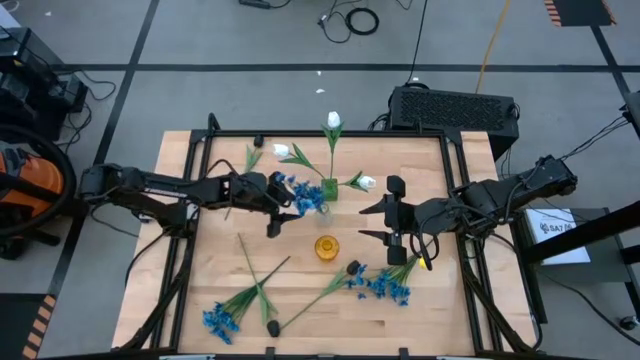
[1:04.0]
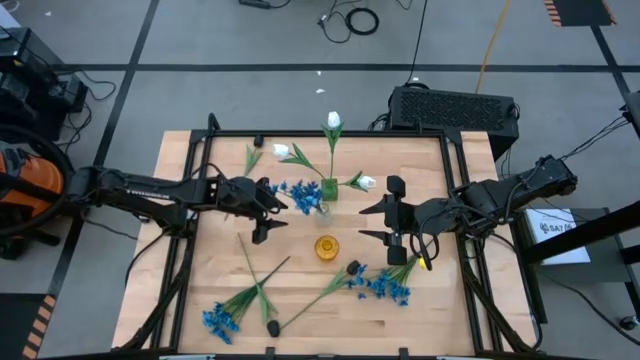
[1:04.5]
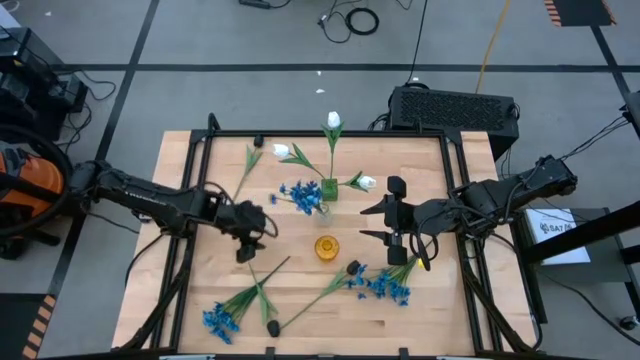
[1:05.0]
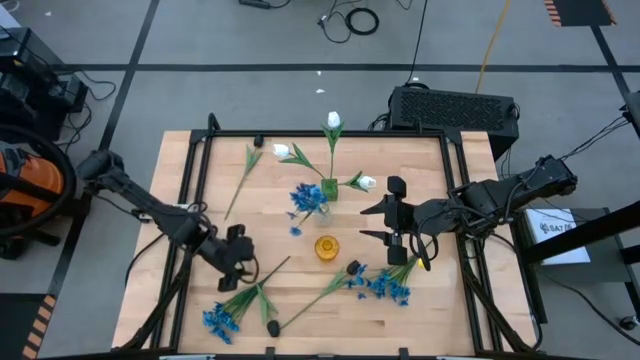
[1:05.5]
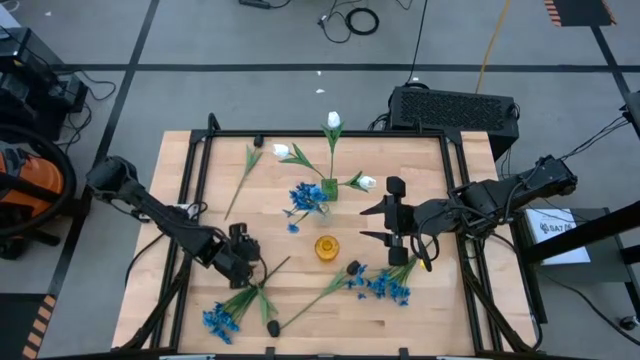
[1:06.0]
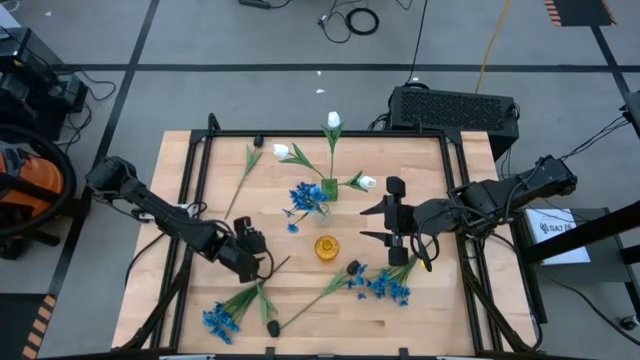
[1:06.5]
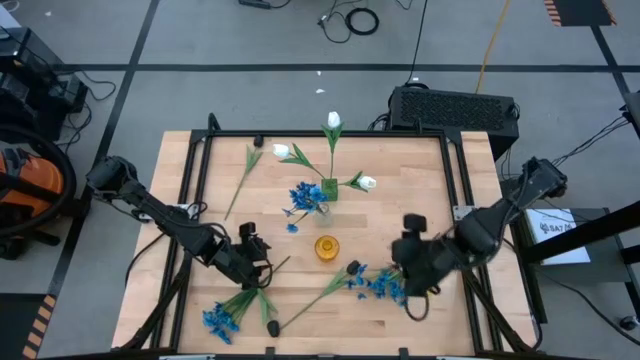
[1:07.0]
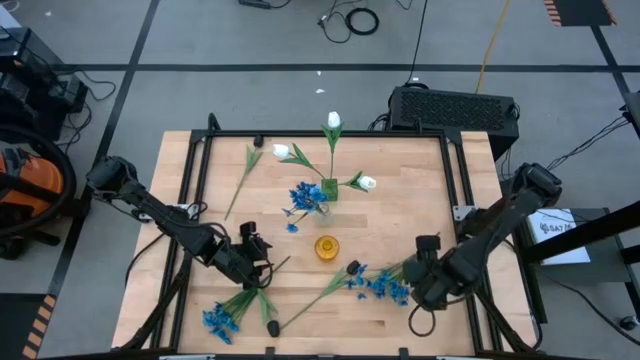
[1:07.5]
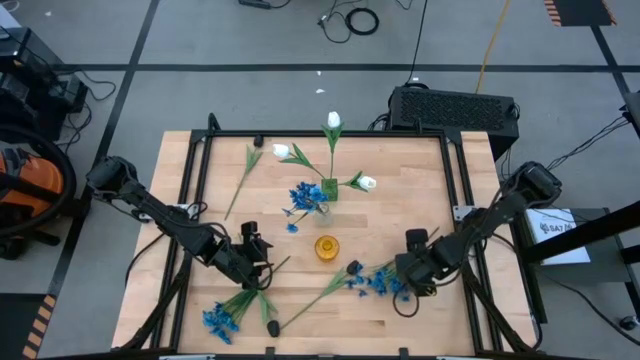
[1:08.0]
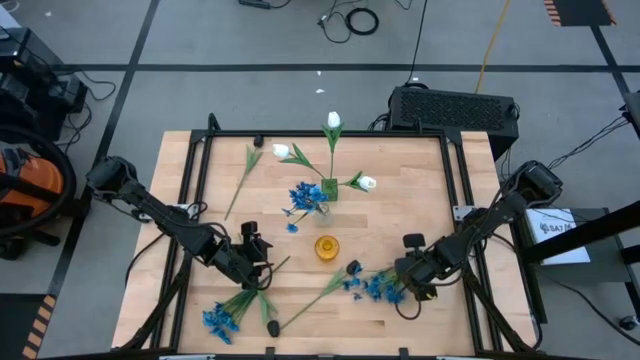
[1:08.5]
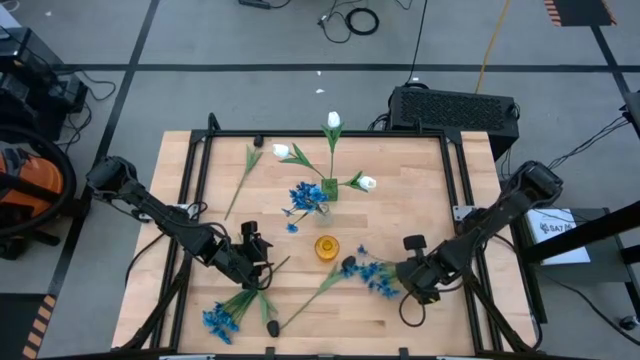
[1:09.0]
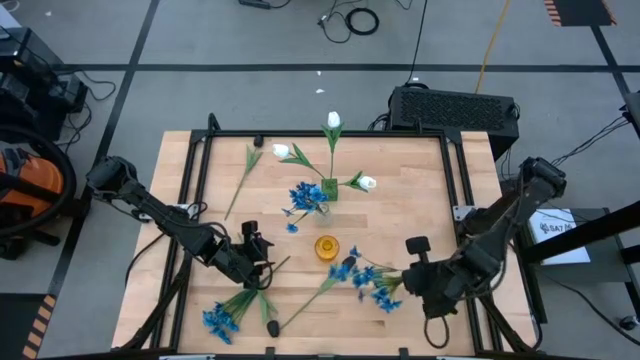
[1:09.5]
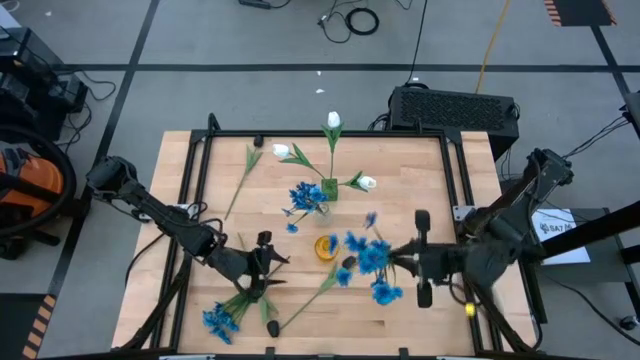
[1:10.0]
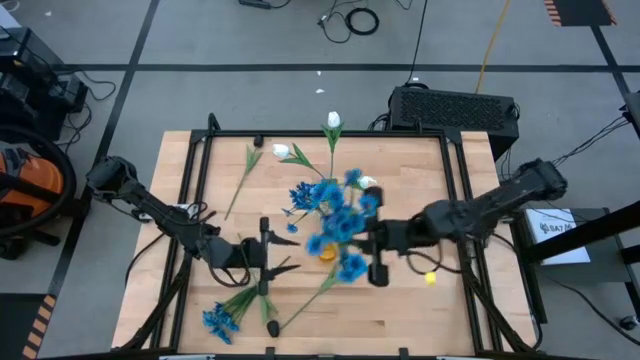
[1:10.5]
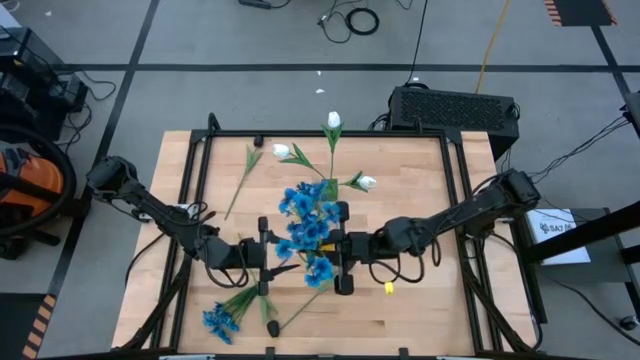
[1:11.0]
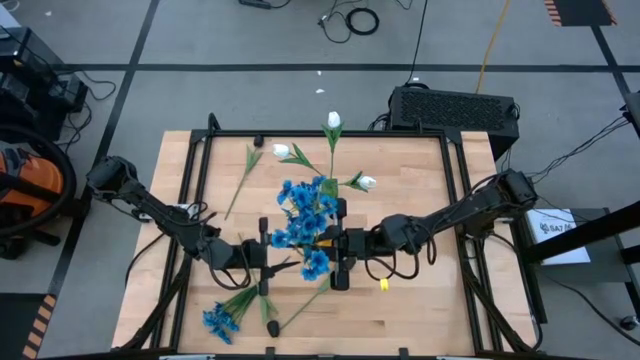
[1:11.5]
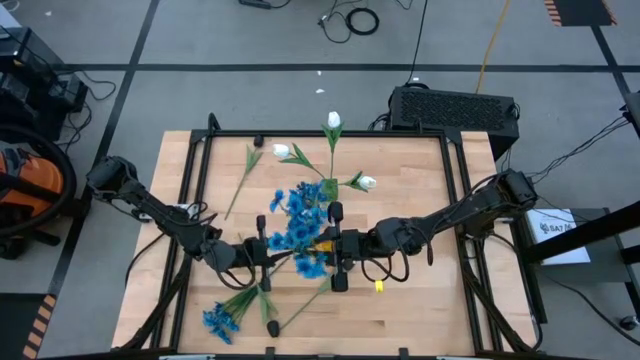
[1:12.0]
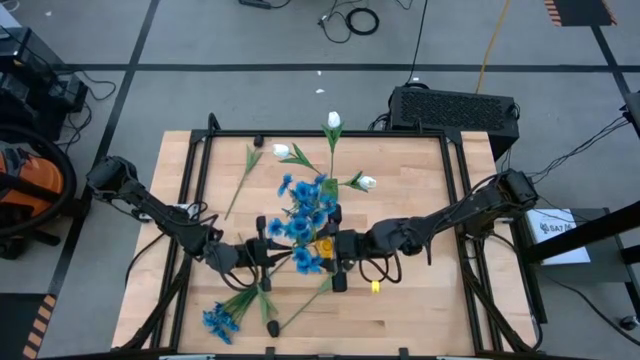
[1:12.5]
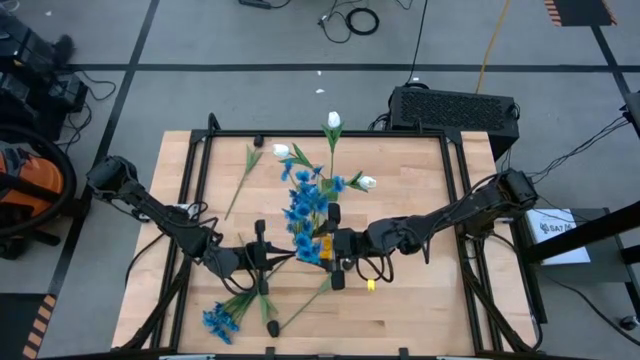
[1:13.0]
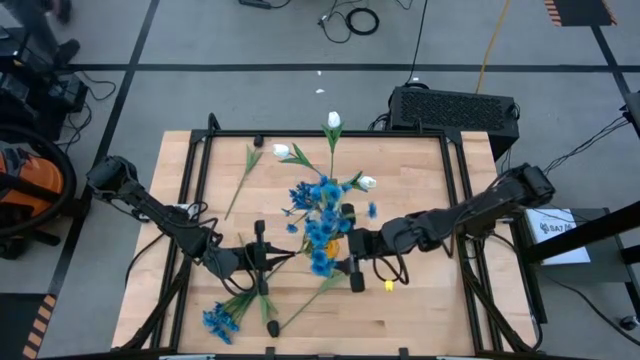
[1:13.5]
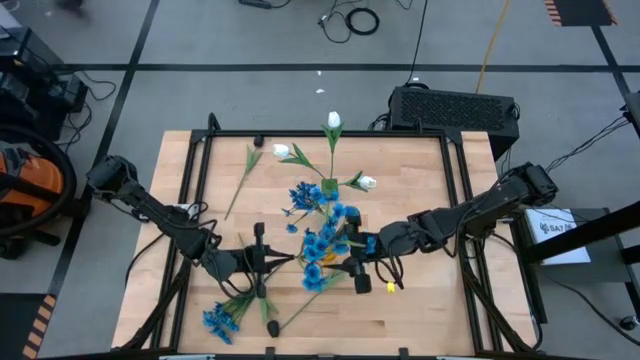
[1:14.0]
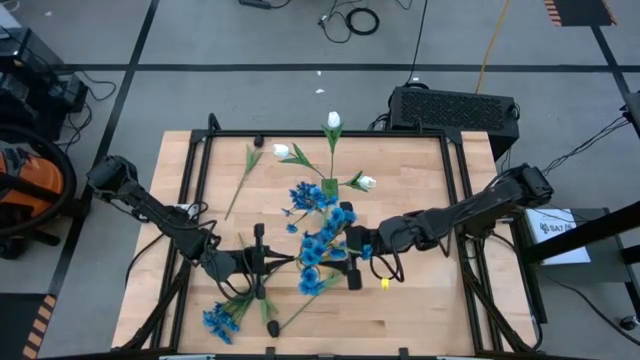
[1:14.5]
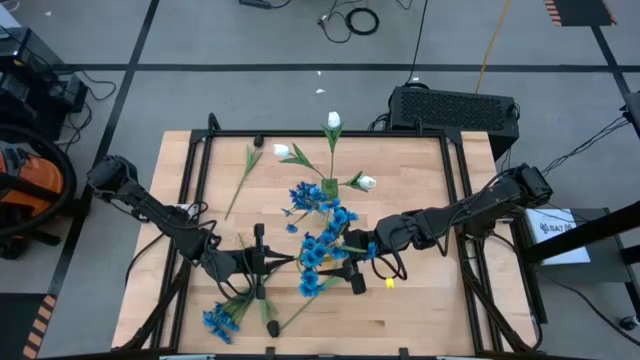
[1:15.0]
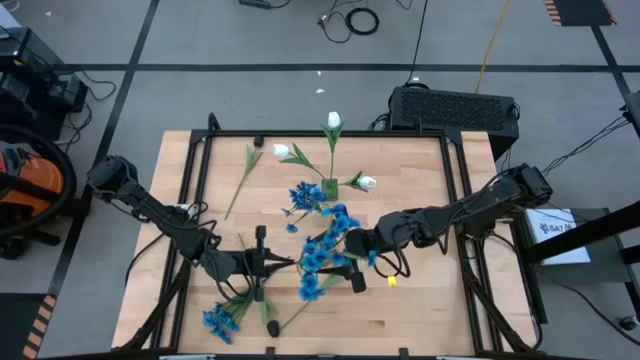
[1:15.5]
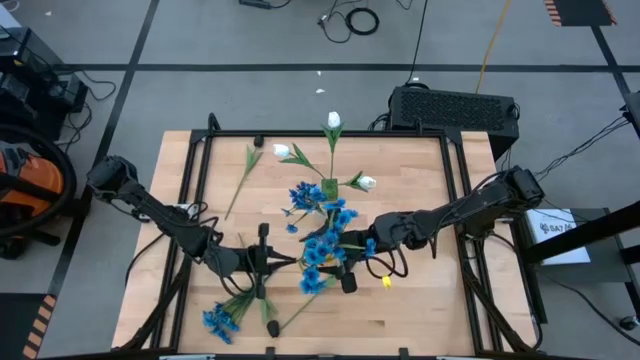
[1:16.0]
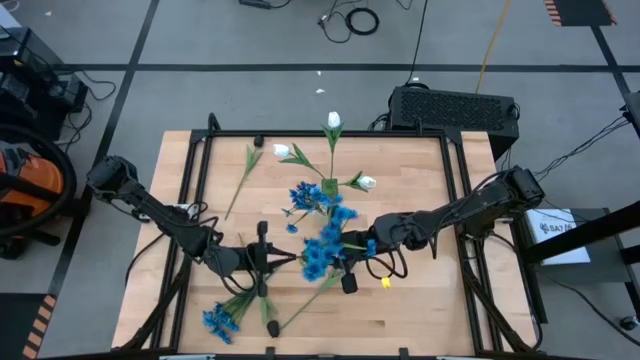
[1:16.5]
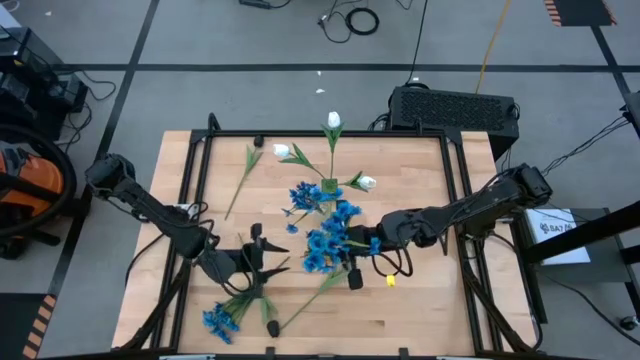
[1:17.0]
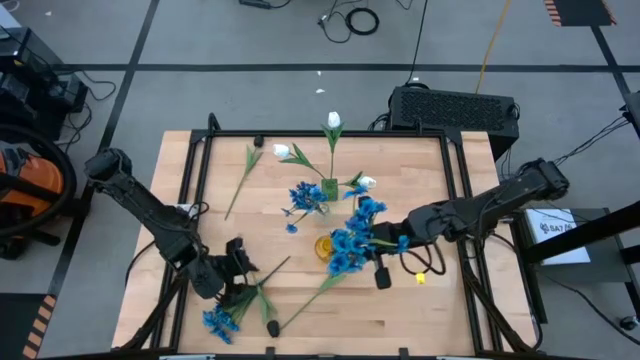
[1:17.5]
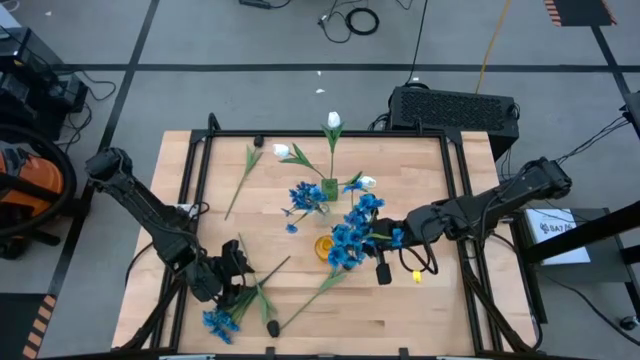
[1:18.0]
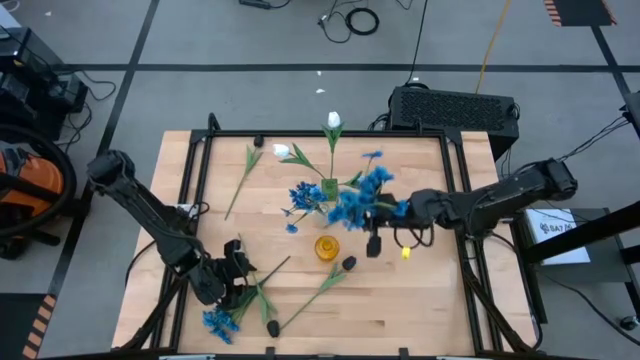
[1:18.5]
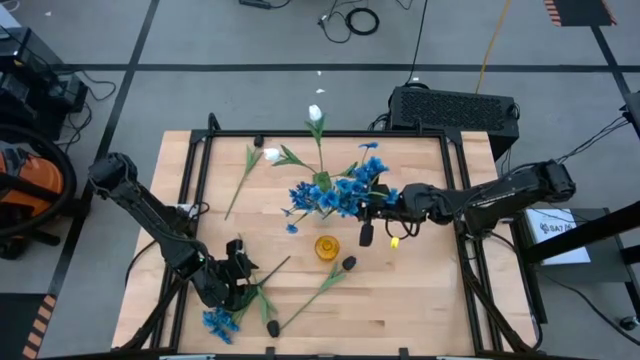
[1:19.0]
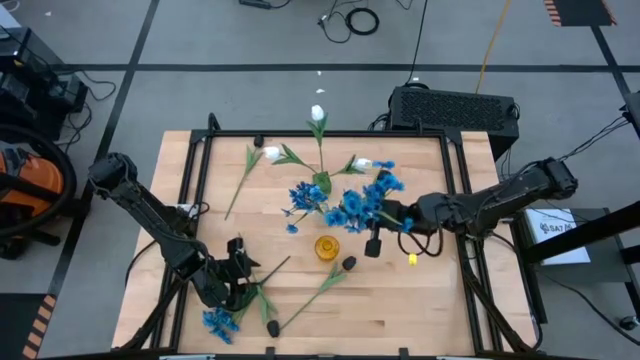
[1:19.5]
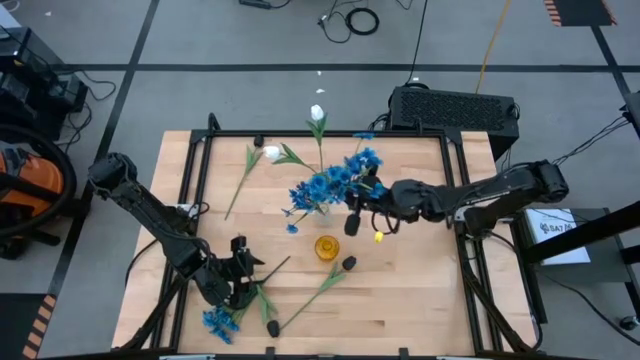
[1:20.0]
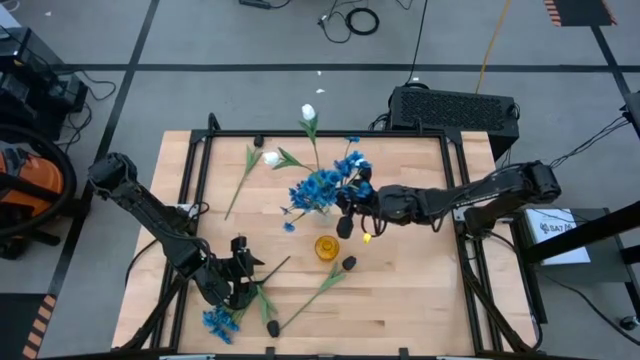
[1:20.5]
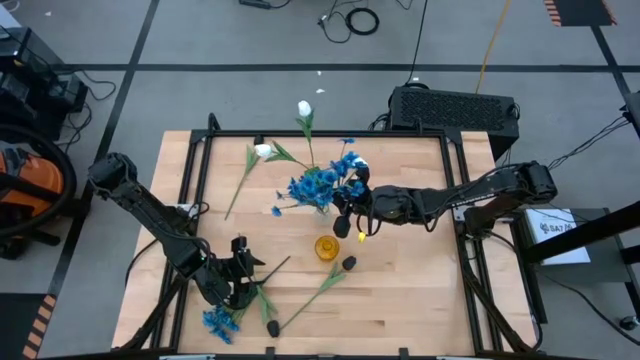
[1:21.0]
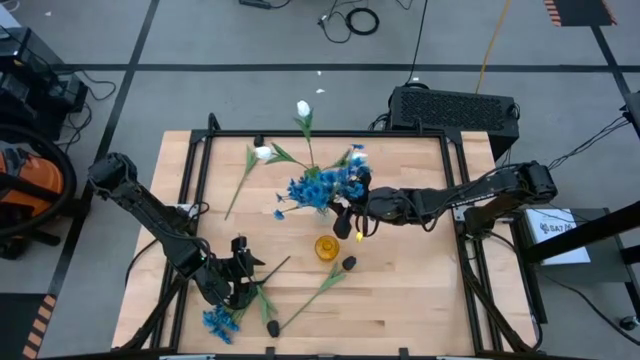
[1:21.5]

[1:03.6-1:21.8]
Task: Sort flowers into vase by color
Put the right blue flower into the transparent vase

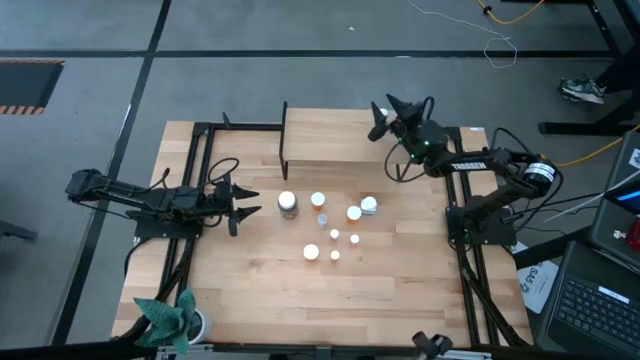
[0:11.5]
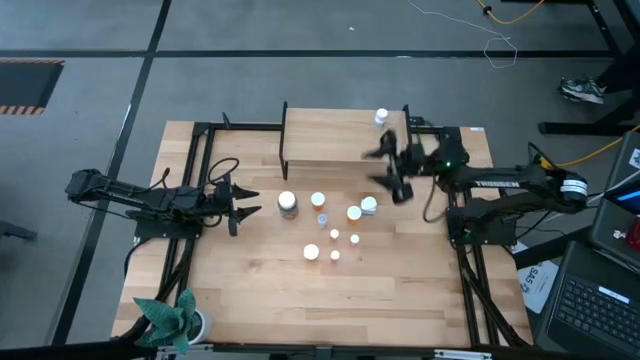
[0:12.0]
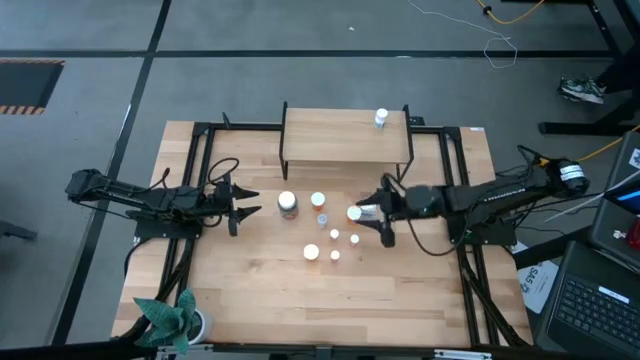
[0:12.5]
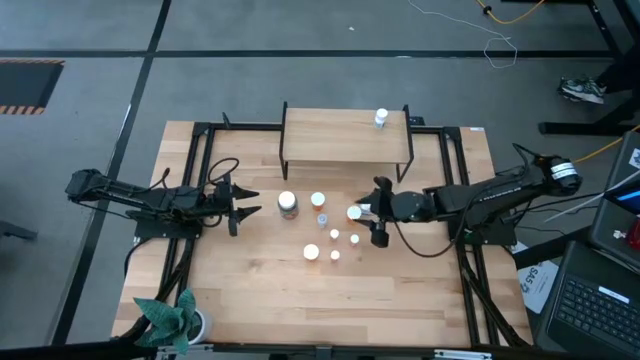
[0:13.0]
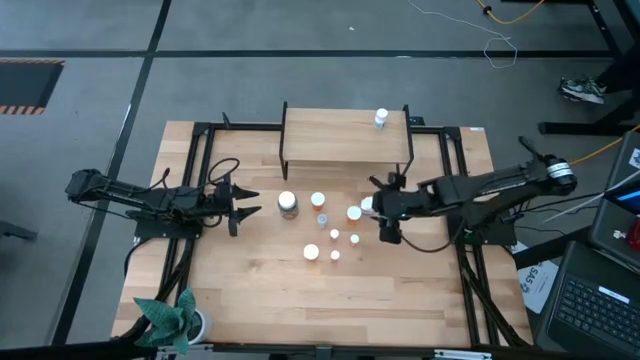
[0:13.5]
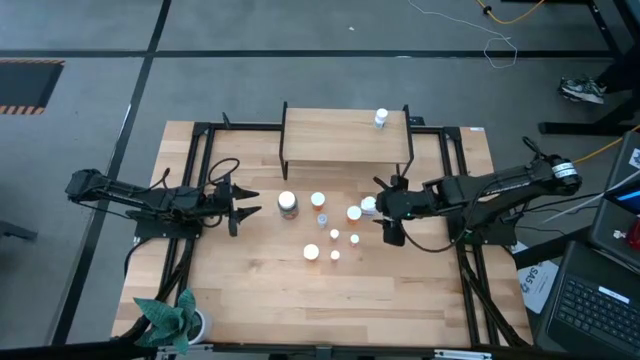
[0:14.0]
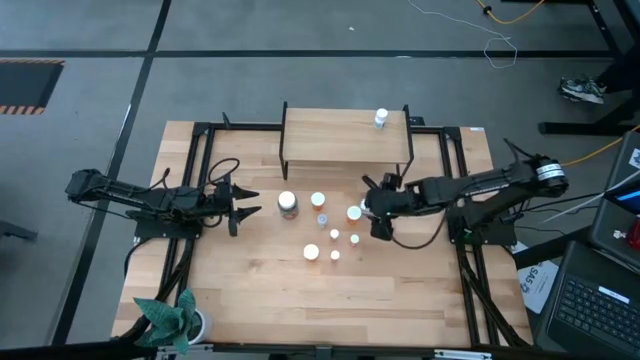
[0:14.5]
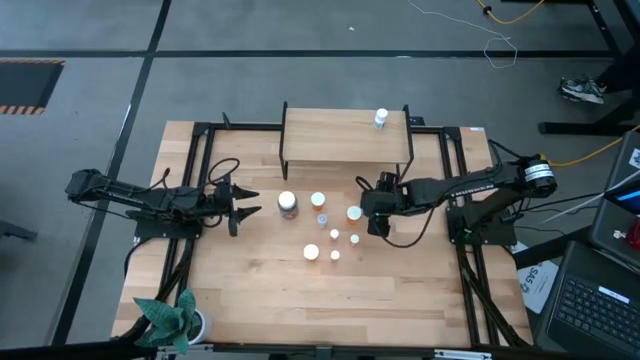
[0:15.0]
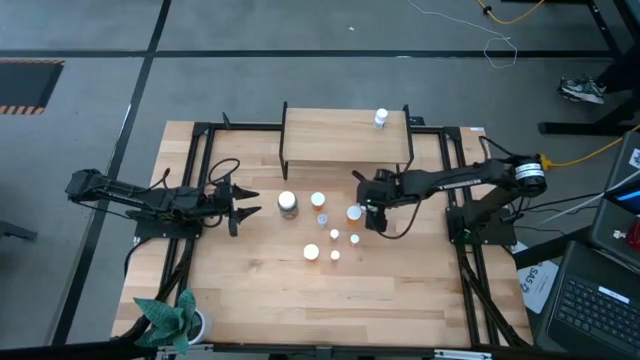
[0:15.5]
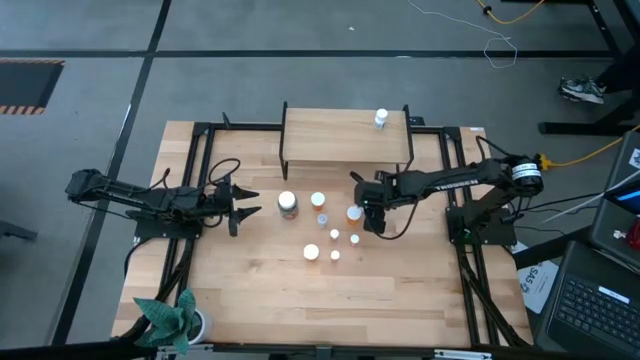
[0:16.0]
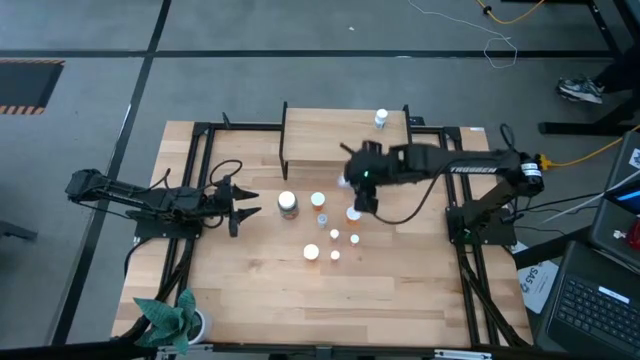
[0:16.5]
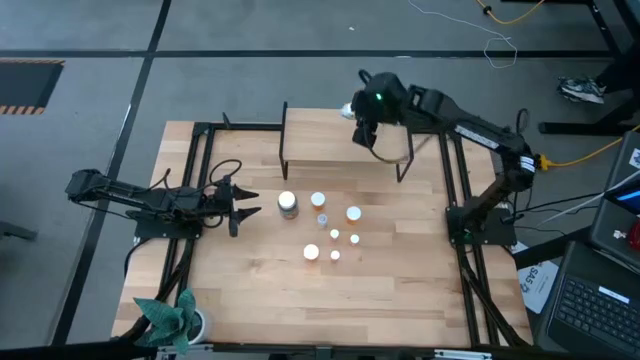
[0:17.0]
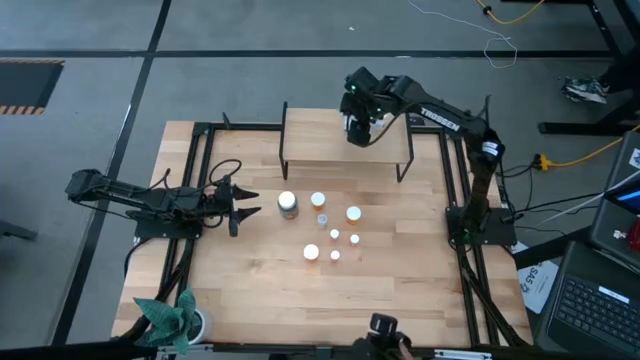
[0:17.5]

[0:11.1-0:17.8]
Task: Pick and place medicine bottles onto shelf by color
Put the white pill bottle on the shelf
